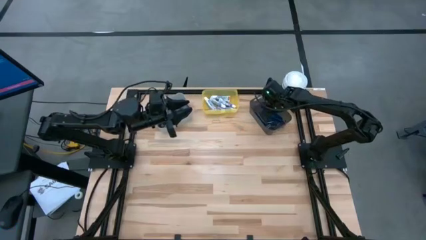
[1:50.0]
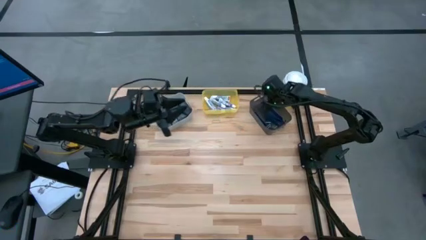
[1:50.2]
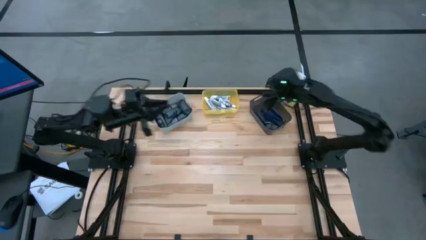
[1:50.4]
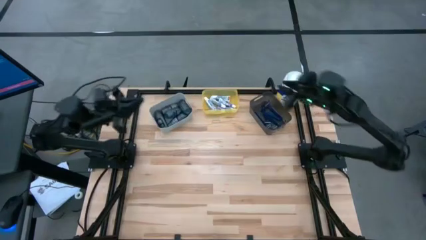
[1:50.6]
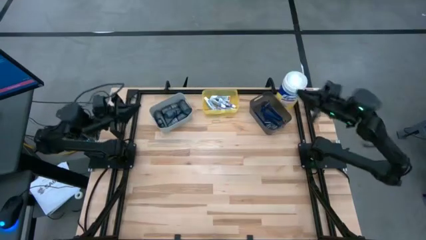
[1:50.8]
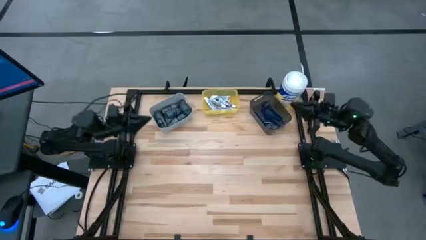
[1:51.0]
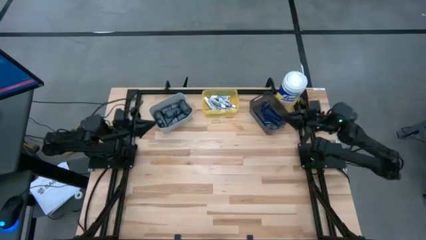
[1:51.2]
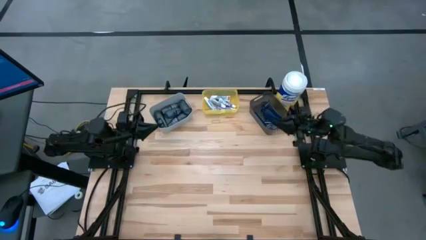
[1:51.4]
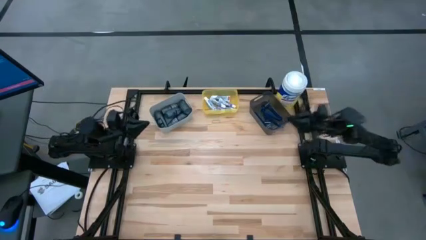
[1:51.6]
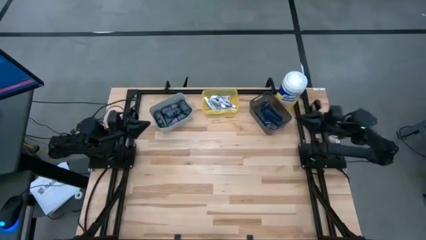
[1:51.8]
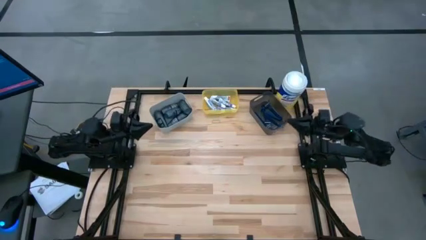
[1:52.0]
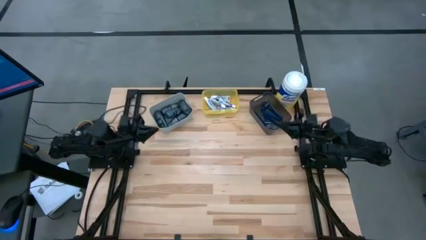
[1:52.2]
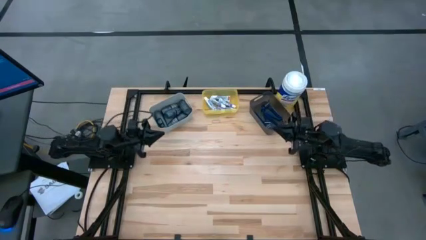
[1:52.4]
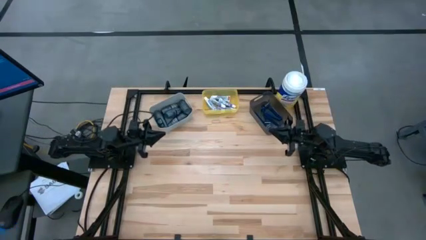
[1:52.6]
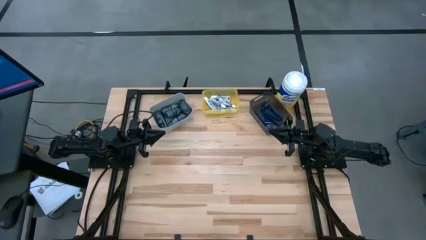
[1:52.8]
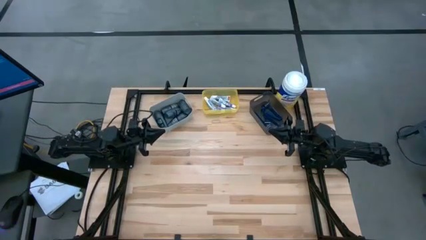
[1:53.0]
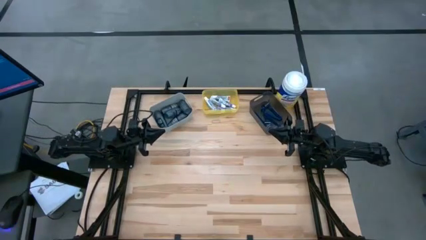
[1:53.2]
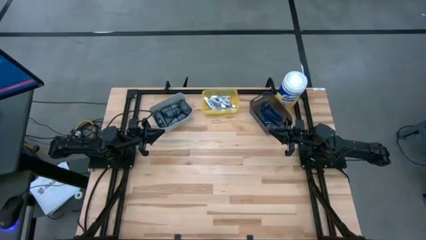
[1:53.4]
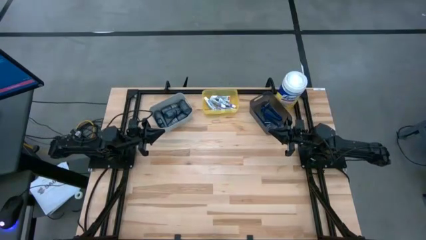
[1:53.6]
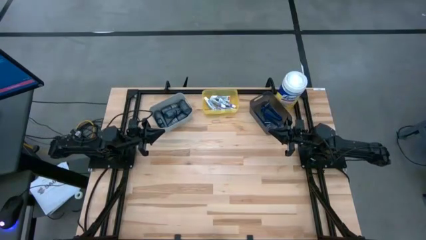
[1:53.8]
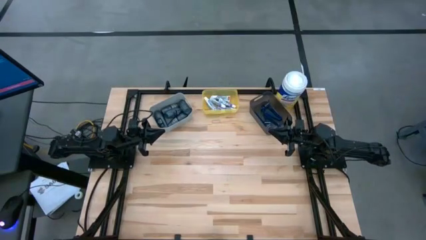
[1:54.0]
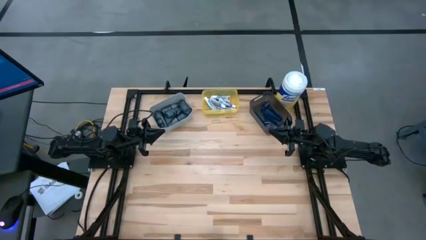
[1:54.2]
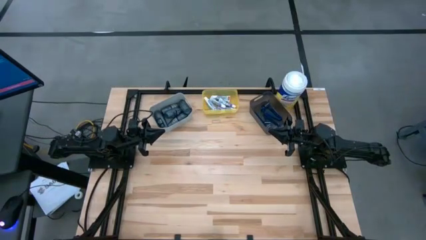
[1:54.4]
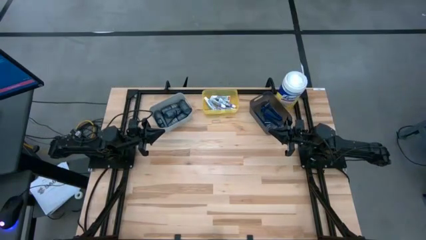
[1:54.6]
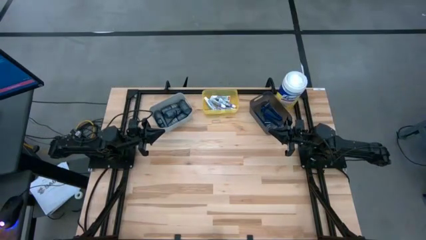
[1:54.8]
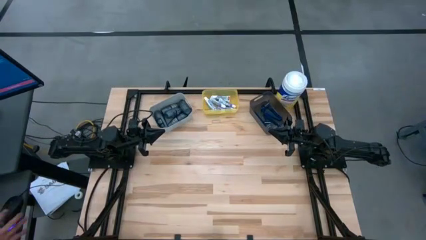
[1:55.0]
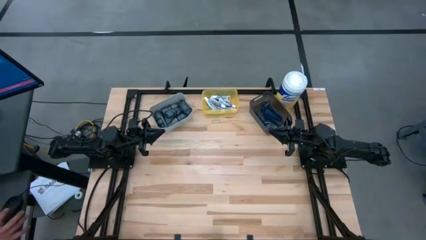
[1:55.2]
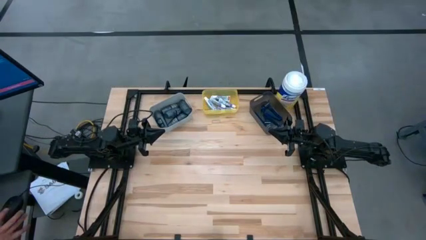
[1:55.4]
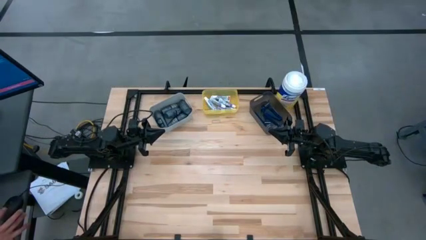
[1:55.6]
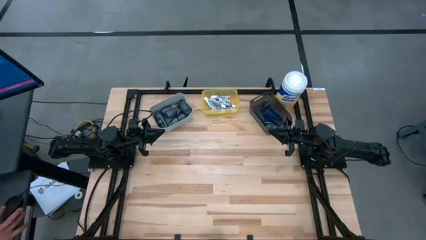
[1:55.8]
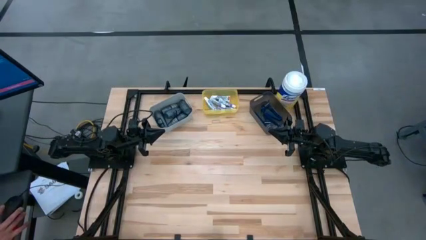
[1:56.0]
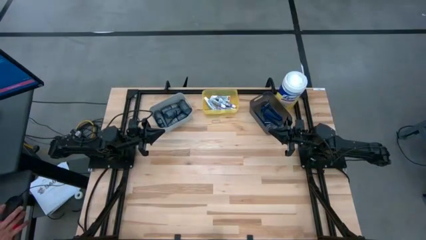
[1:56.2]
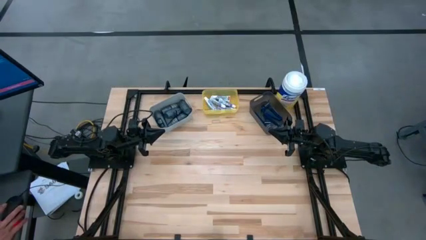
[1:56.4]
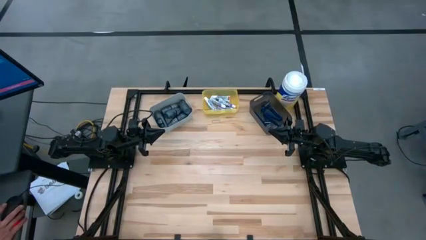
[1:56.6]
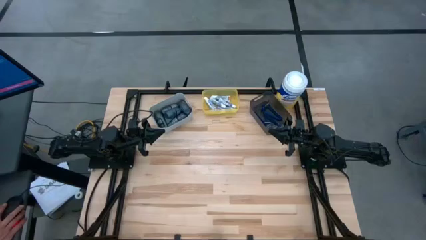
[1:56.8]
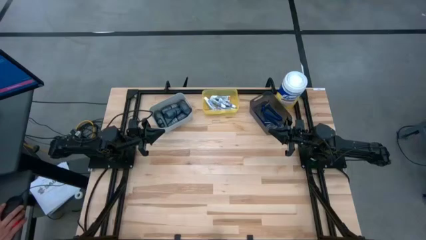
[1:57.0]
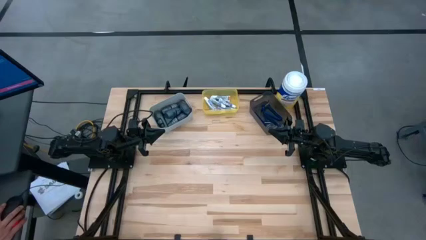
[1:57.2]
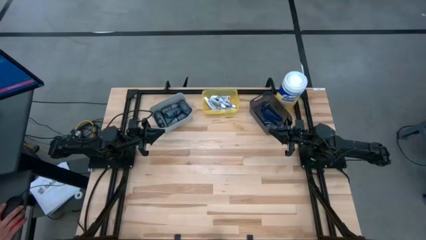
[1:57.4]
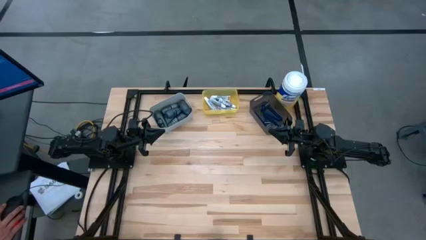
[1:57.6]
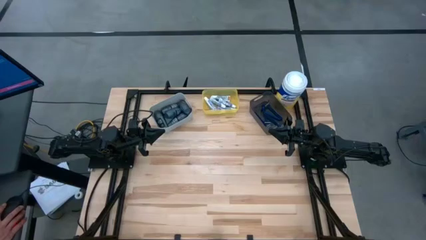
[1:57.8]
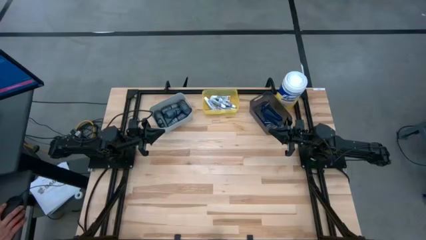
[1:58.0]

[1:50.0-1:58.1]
Task: Pick & Place Travel size toiletries
Return to Home Position

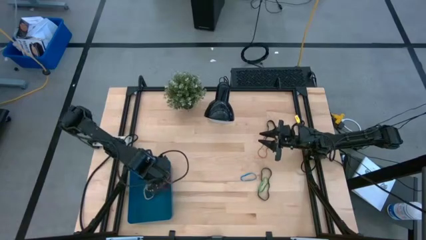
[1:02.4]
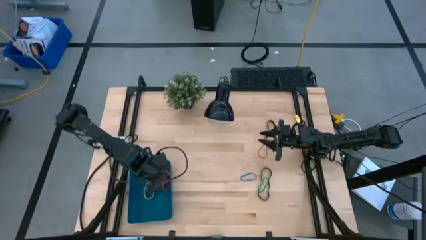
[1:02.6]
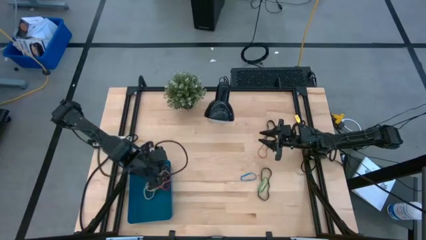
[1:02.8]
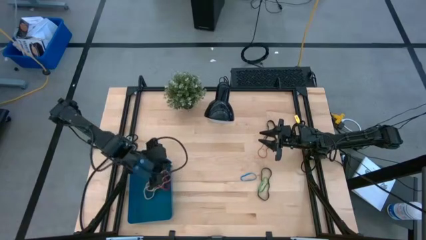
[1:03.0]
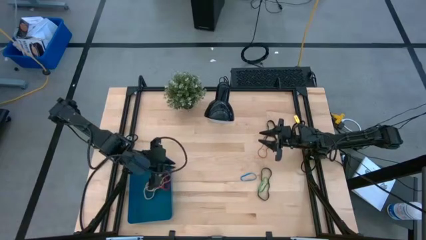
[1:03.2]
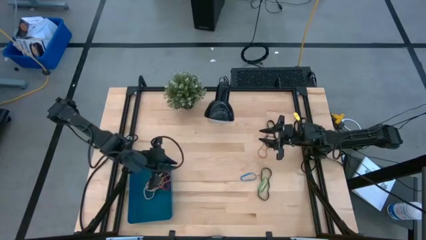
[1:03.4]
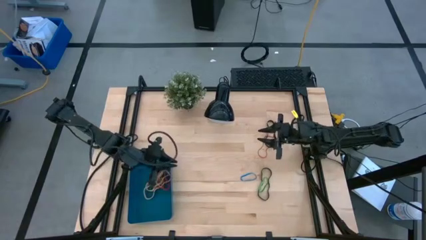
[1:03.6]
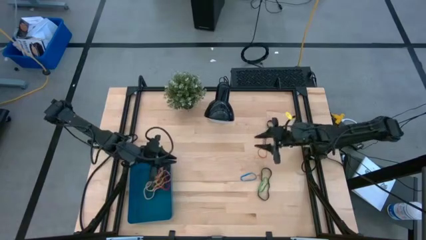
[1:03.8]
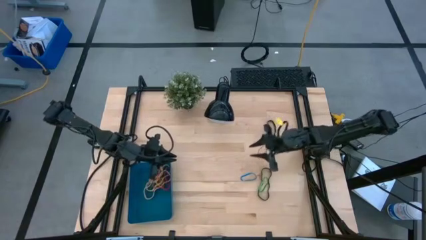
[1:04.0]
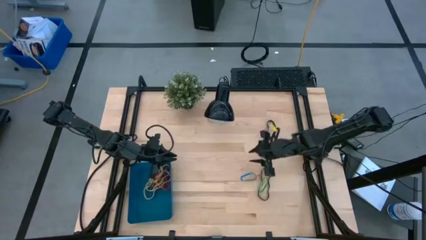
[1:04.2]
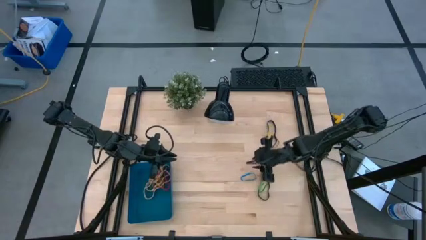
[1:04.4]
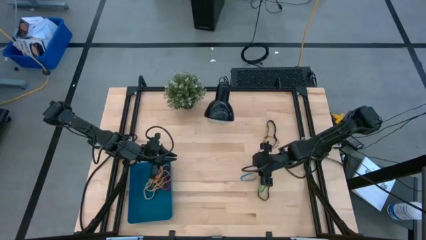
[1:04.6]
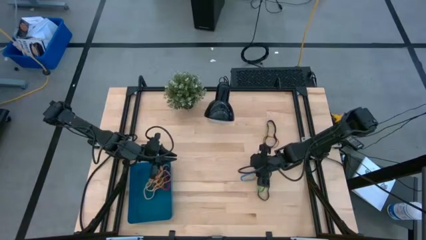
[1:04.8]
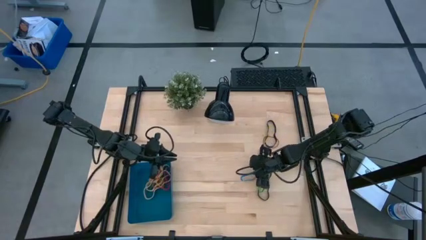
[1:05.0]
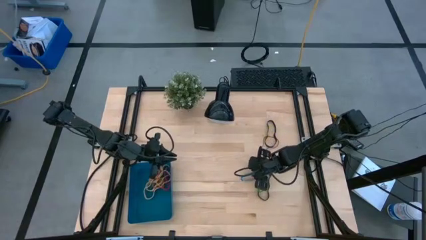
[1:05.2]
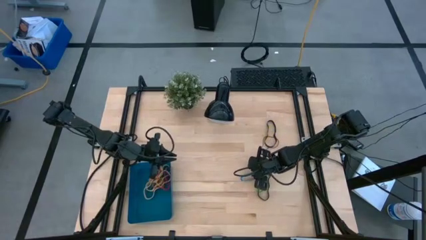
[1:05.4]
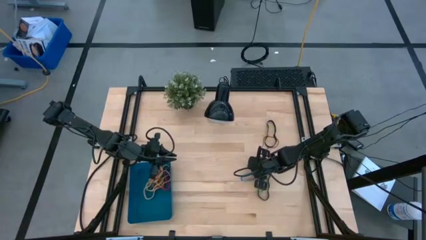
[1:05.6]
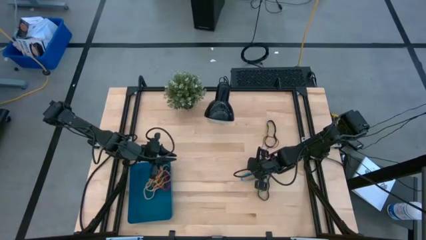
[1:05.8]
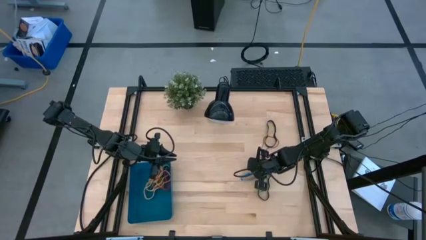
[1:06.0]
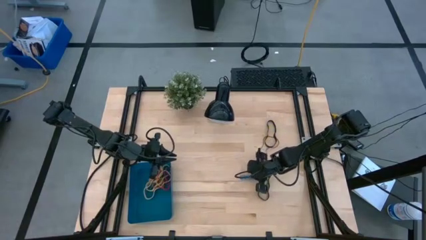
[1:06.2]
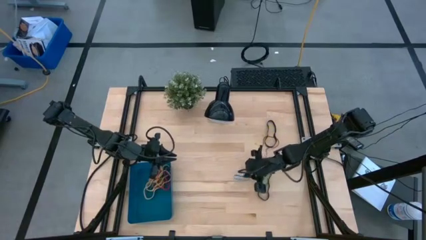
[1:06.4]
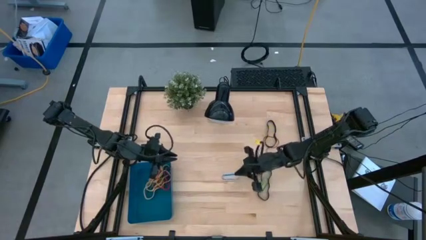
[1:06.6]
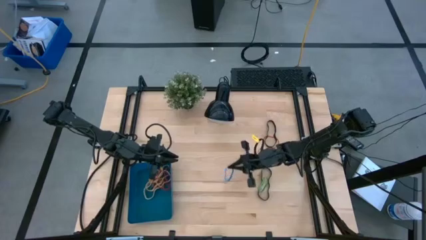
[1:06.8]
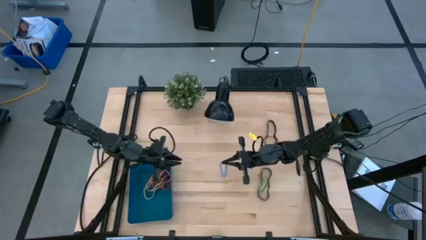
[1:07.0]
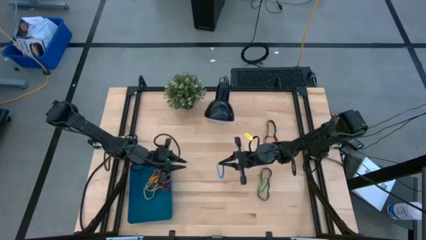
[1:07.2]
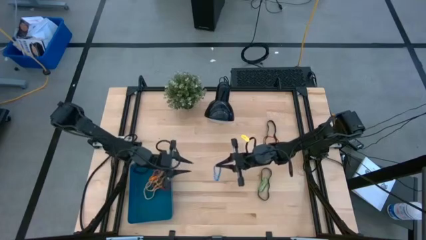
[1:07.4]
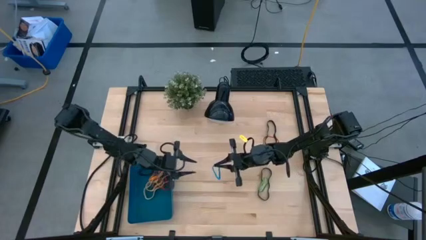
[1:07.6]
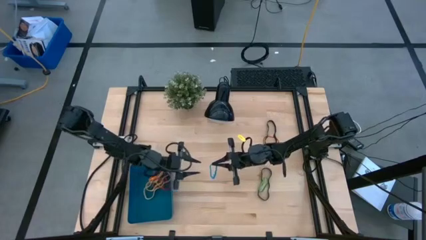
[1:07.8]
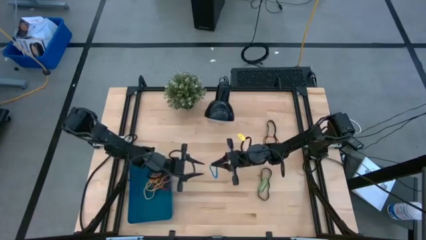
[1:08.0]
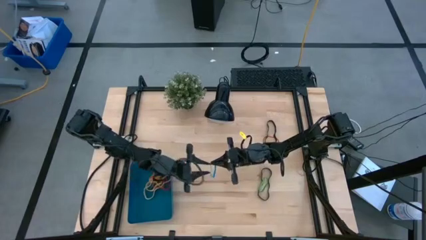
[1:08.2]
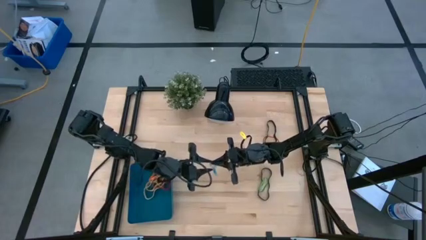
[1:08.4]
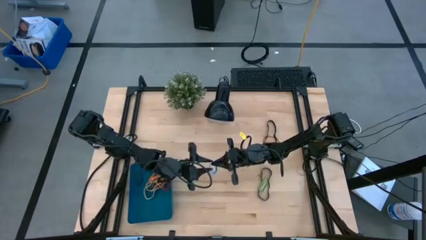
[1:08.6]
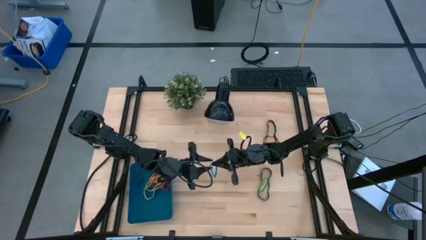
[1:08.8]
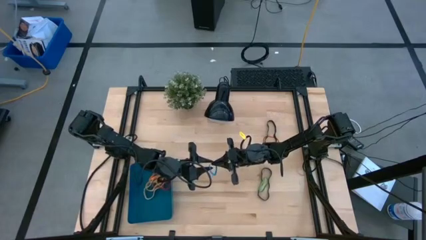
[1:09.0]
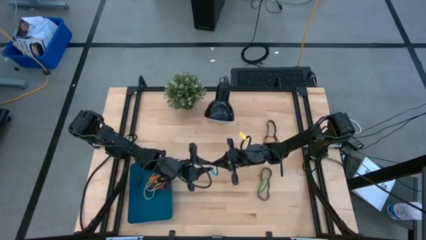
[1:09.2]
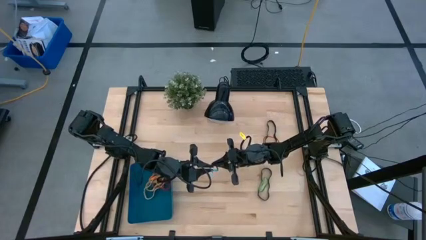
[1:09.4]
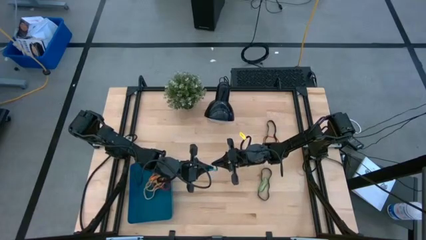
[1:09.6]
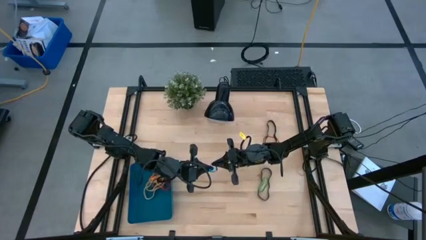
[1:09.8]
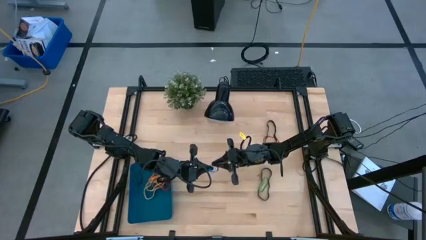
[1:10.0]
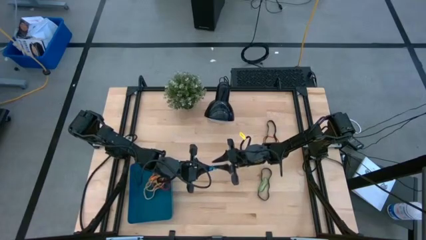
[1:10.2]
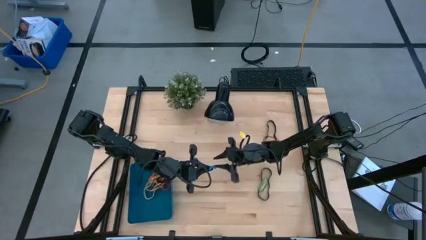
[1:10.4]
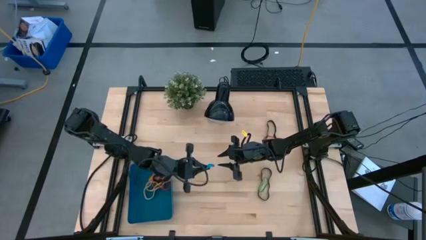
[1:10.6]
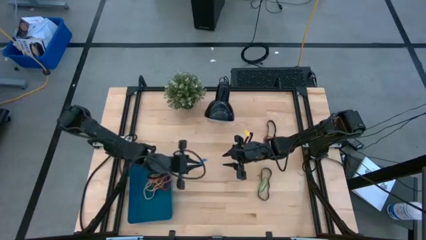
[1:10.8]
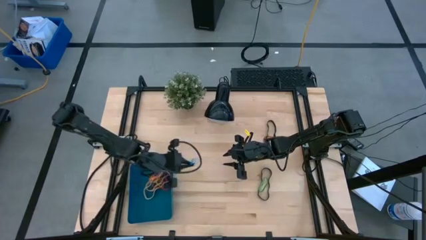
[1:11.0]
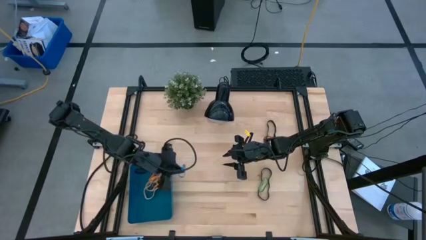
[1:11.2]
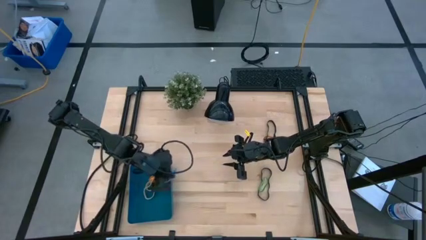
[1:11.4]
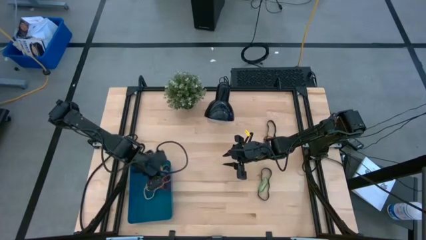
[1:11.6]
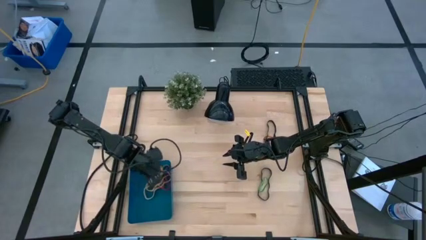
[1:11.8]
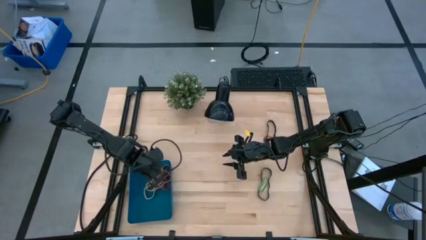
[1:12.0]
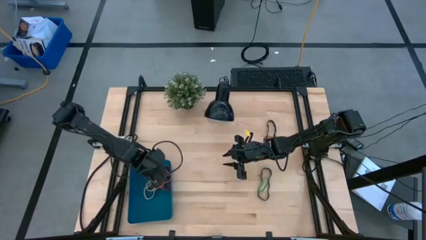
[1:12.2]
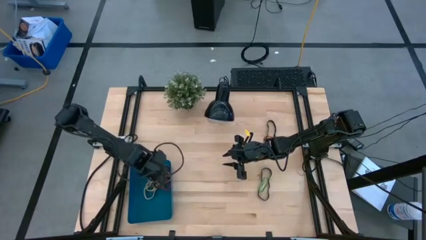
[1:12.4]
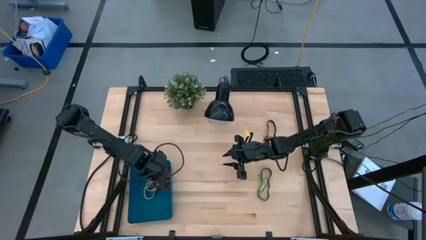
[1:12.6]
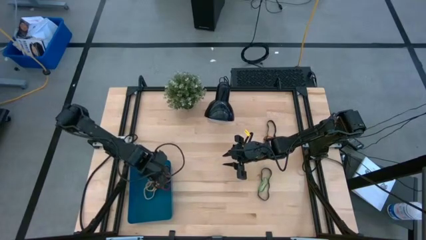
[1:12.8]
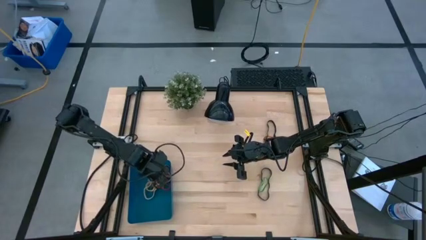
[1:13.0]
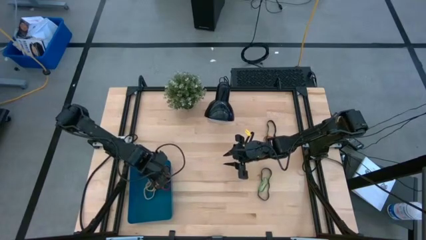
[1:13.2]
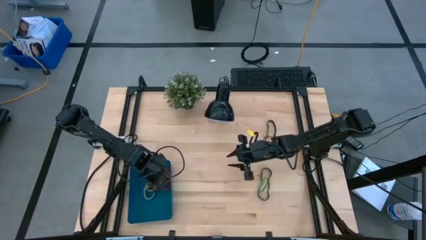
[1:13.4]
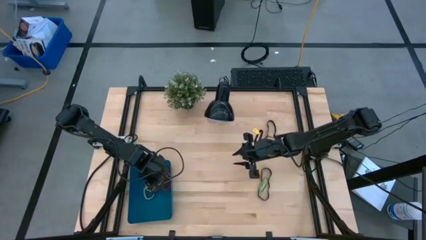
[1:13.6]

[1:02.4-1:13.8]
Task: Pick and place rubber bands into bin
Put the blue rubber band into the blue bin
